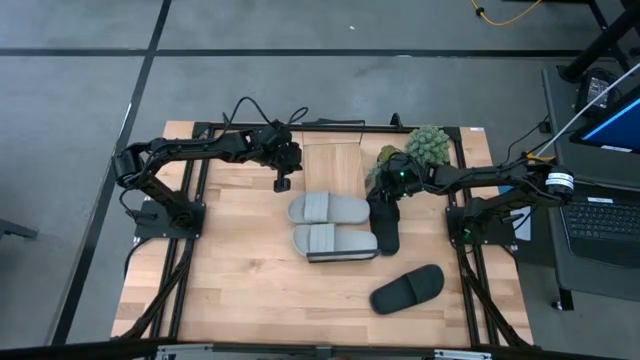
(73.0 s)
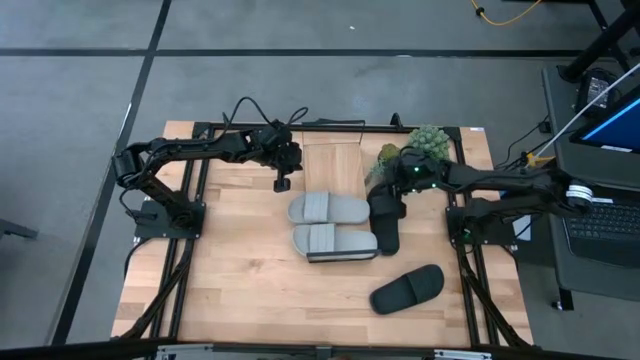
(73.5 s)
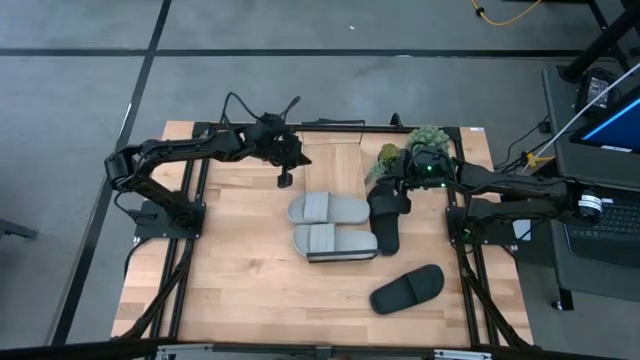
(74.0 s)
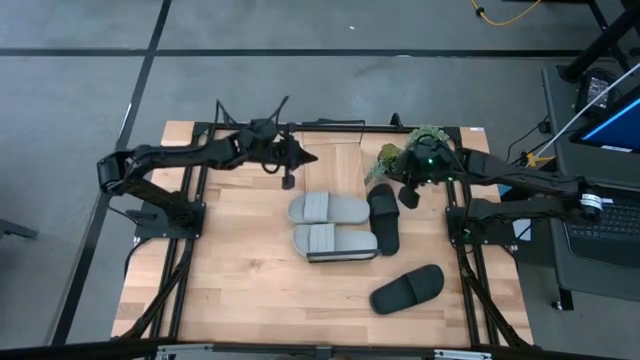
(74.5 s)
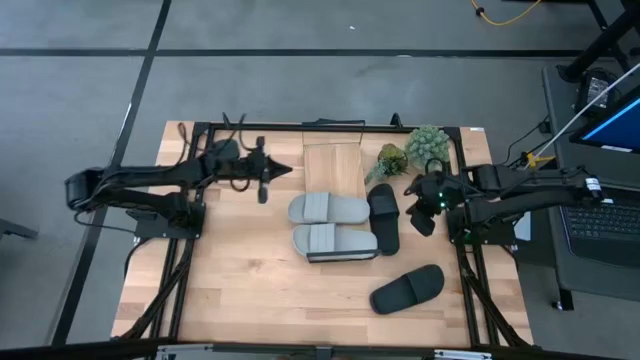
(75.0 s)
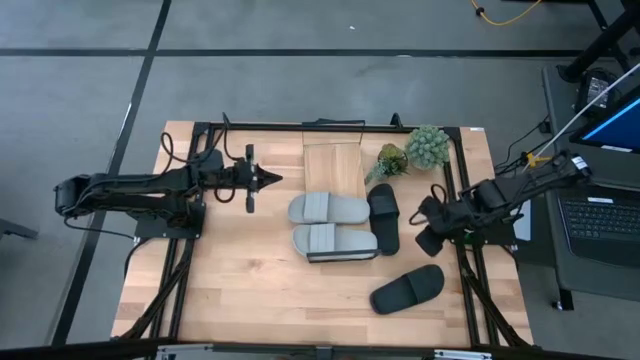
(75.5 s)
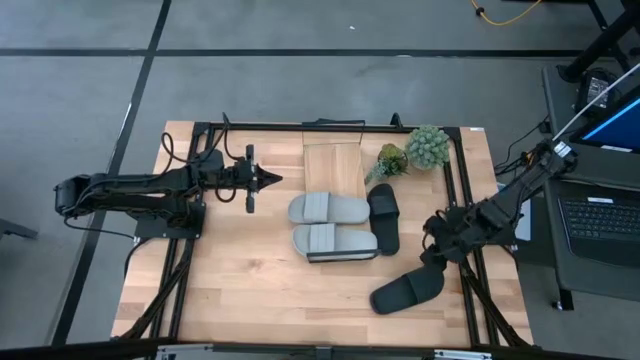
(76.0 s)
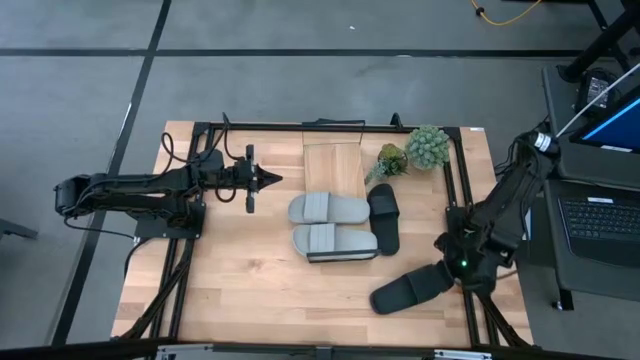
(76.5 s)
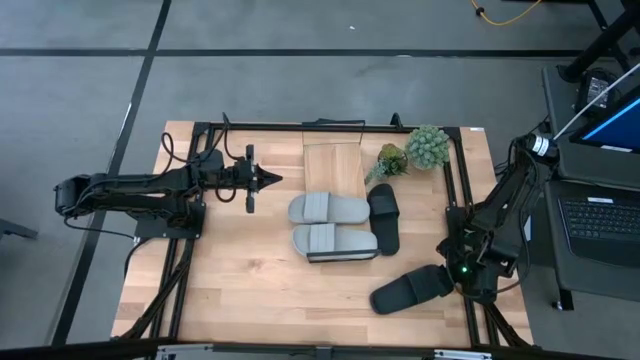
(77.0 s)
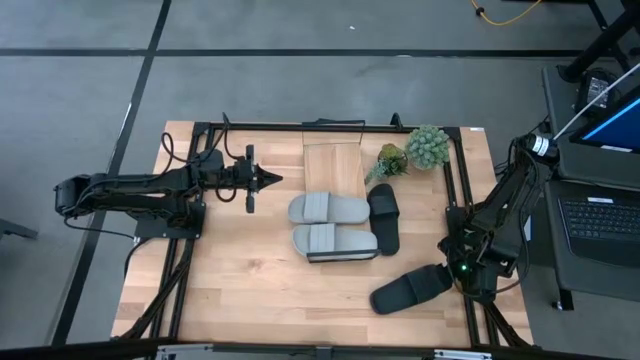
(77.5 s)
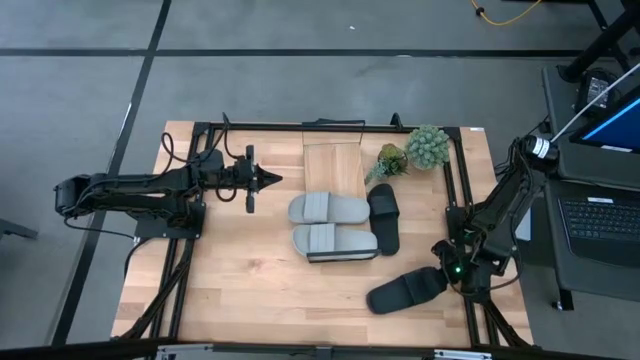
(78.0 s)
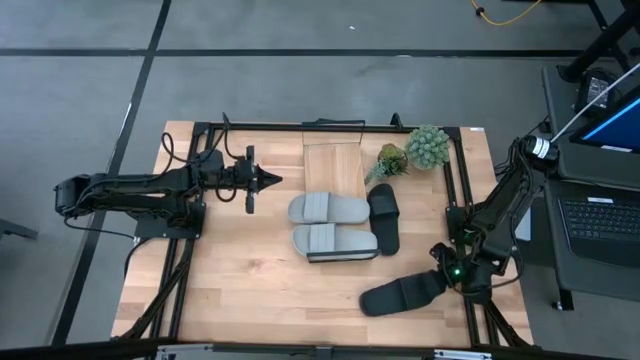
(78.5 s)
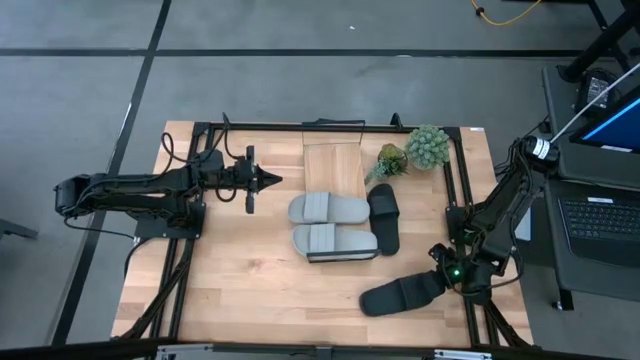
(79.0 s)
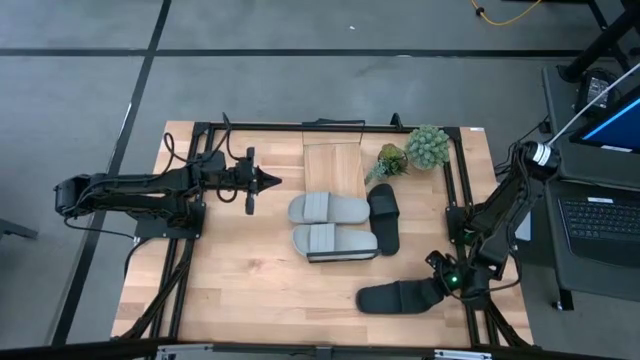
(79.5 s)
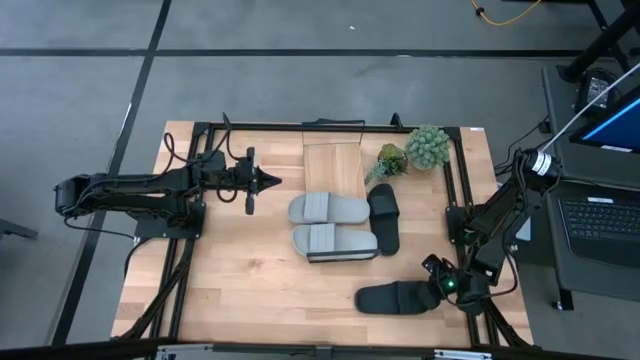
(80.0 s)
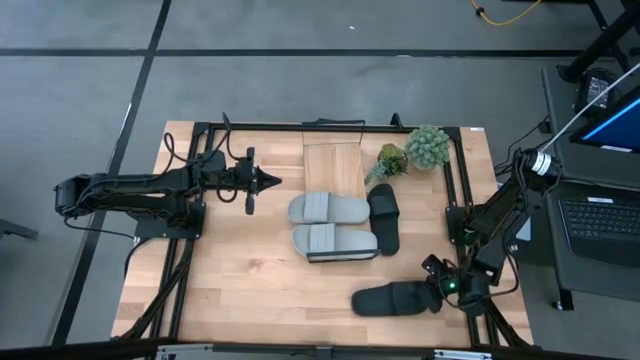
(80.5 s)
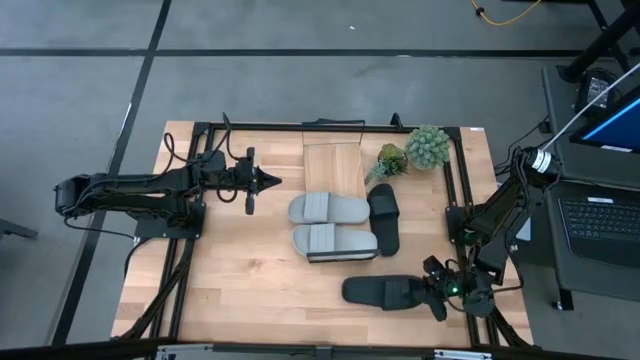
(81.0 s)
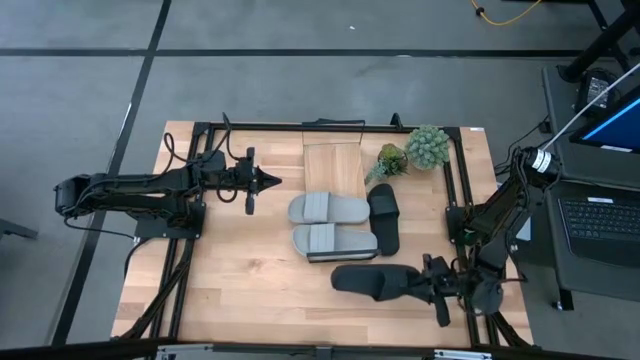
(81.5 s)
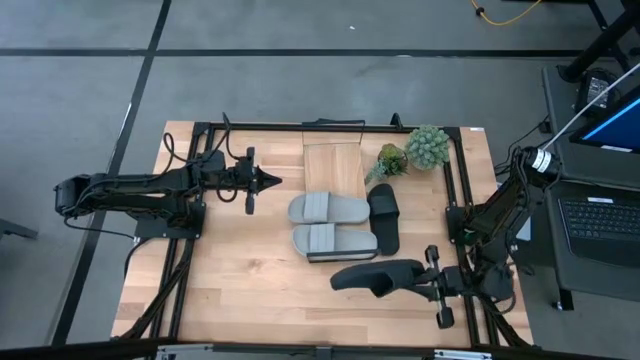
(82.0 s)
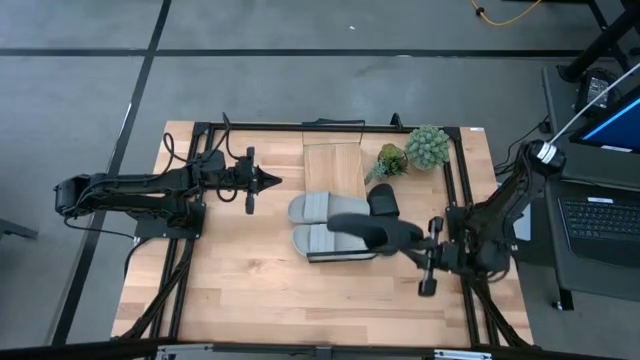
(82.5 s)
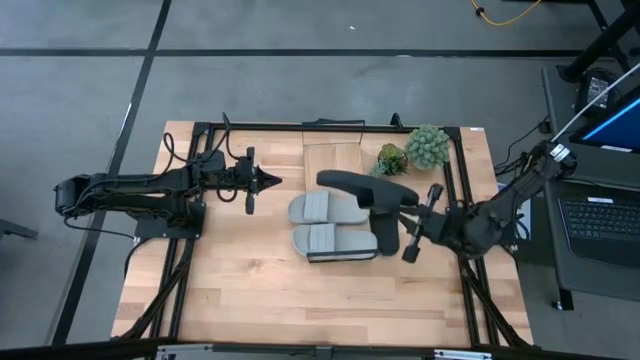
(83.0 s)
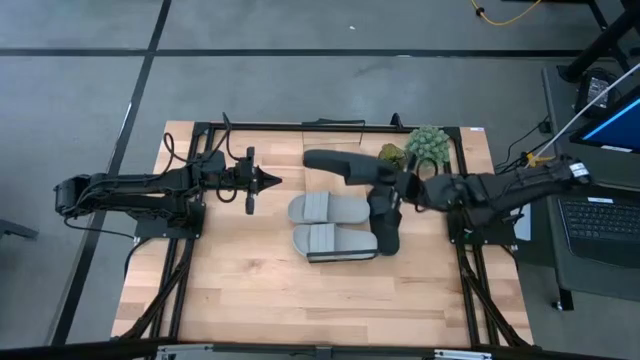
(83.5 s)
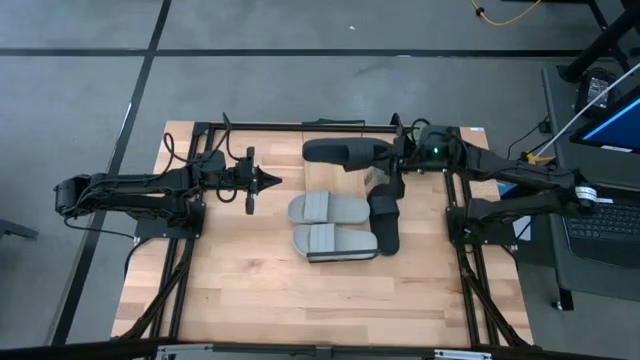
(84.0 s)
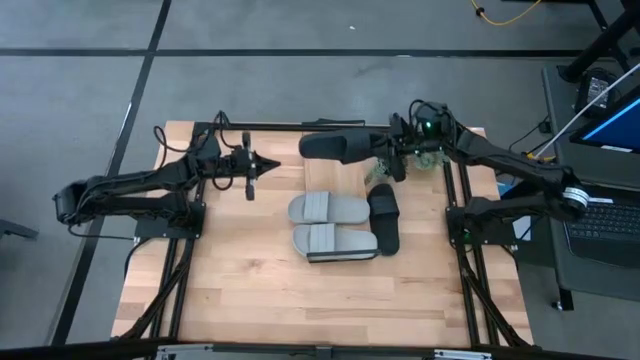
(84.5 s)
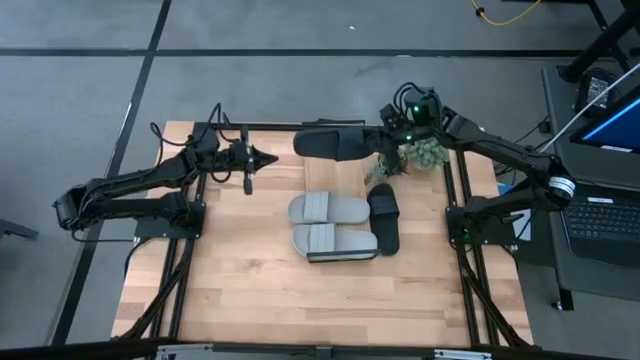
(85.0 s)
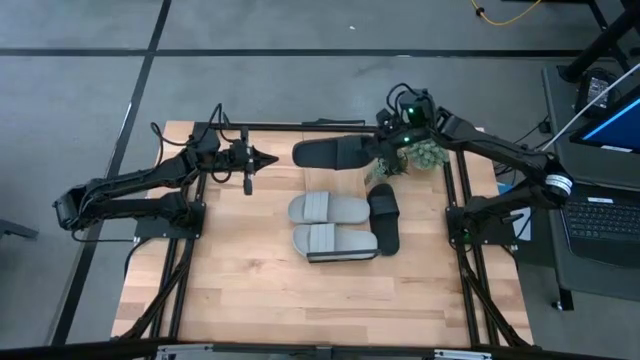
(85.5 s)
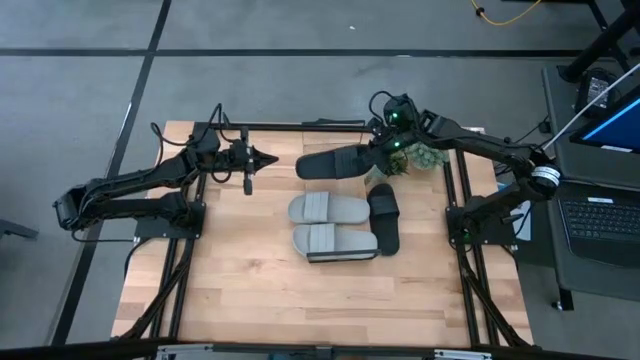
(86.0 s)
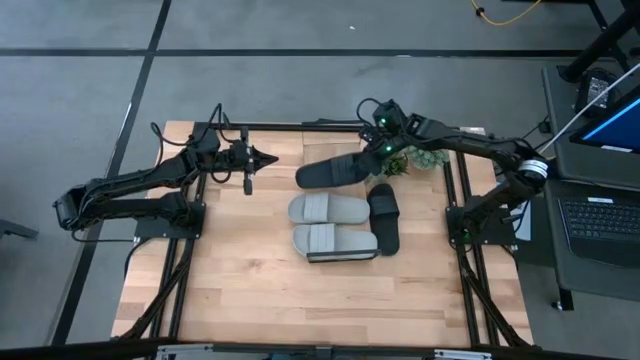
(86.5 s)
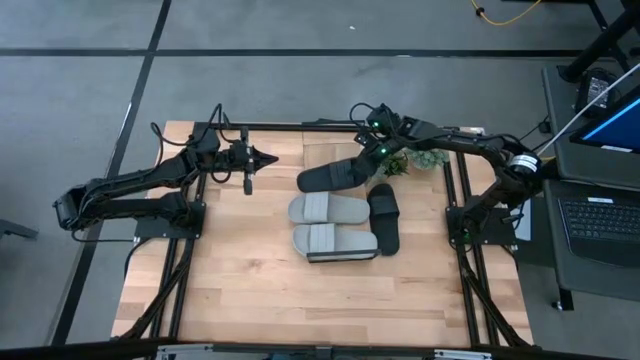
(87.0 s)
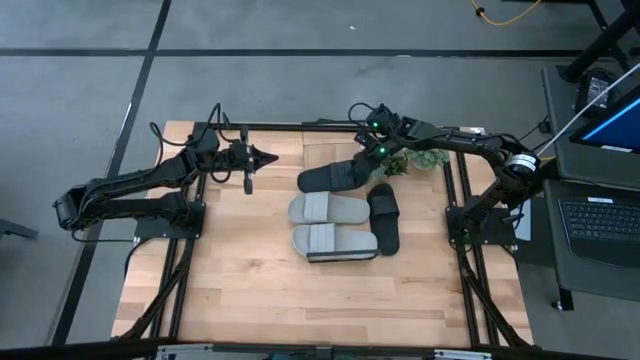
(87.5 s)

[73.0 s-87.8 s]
Task: Pick and place slides into the shelf
Put the bottom black slipper on the shelf
